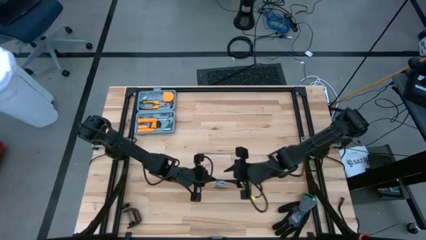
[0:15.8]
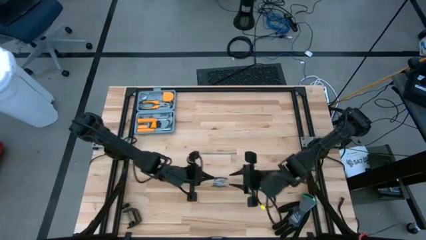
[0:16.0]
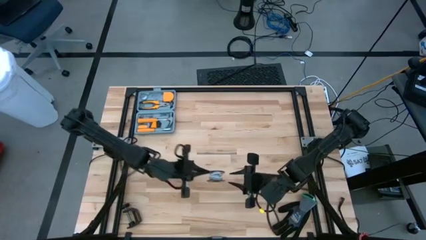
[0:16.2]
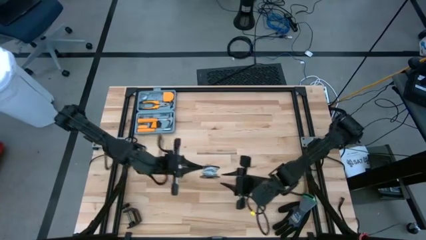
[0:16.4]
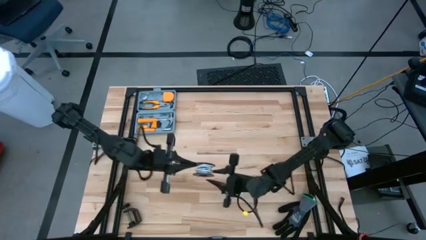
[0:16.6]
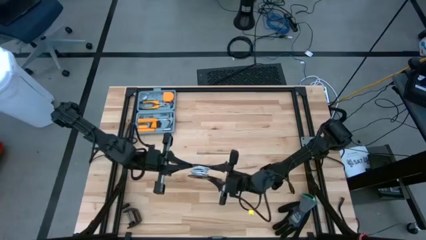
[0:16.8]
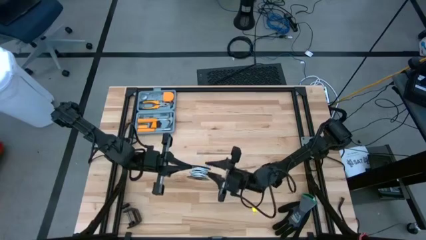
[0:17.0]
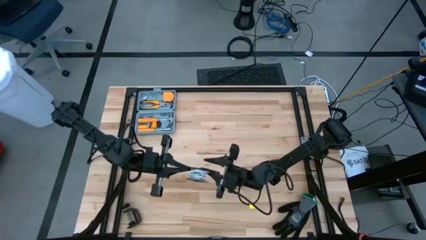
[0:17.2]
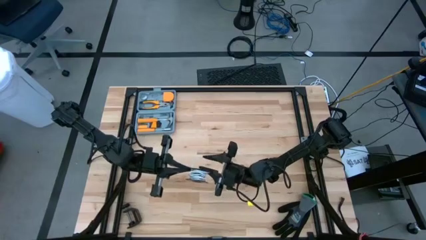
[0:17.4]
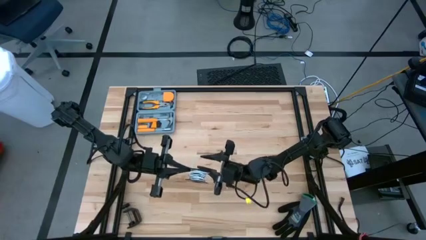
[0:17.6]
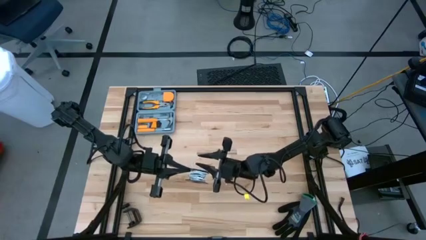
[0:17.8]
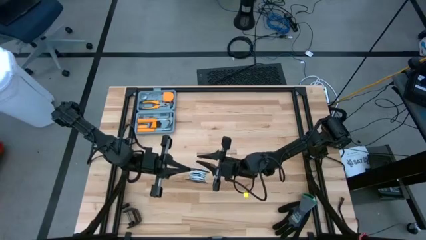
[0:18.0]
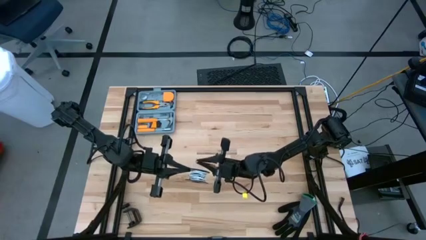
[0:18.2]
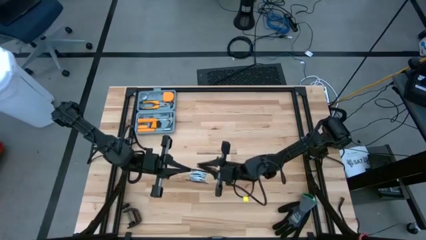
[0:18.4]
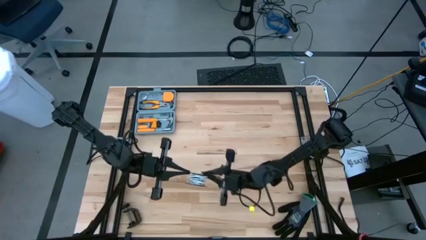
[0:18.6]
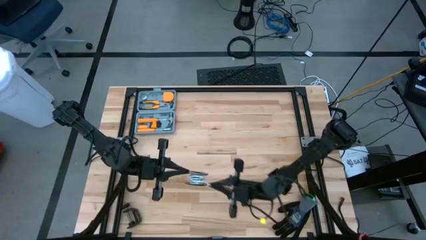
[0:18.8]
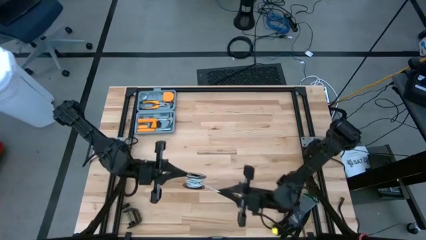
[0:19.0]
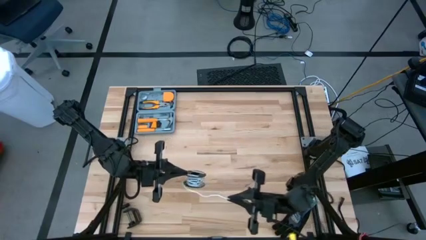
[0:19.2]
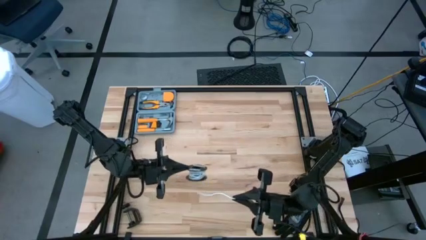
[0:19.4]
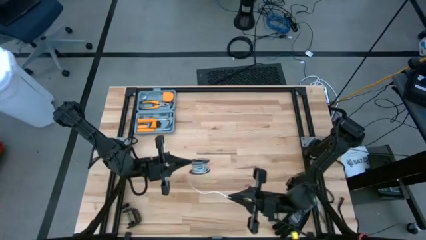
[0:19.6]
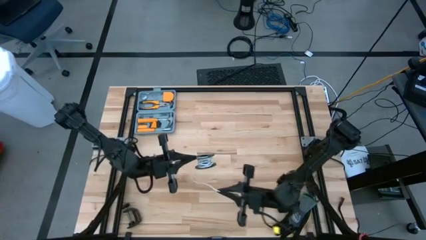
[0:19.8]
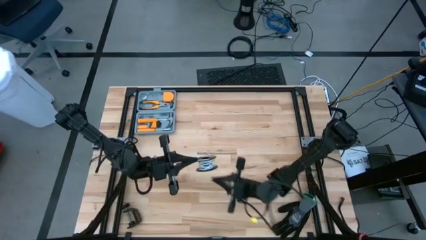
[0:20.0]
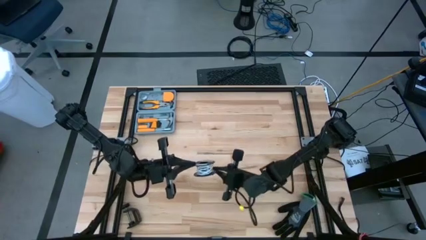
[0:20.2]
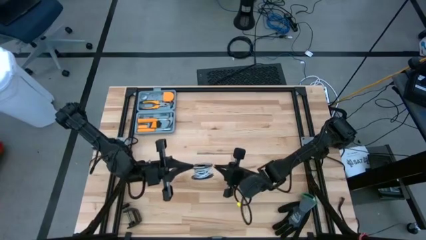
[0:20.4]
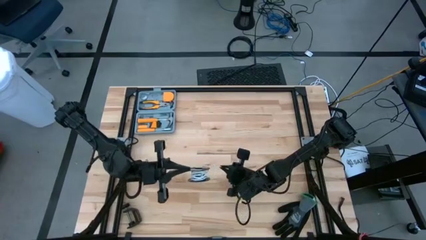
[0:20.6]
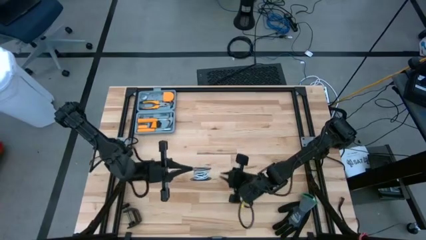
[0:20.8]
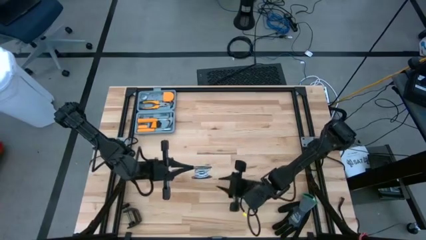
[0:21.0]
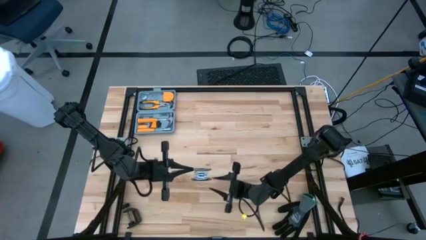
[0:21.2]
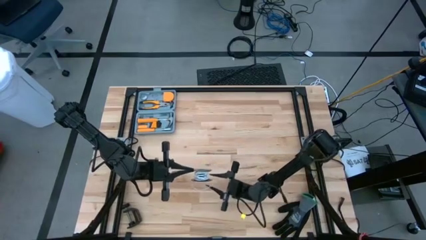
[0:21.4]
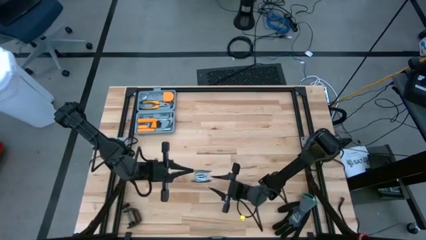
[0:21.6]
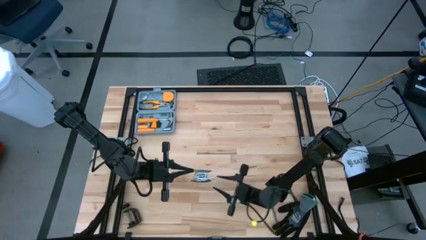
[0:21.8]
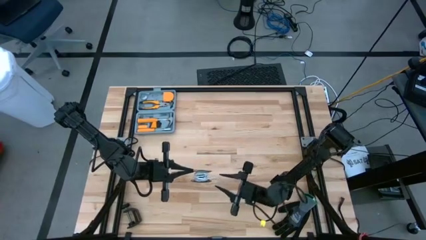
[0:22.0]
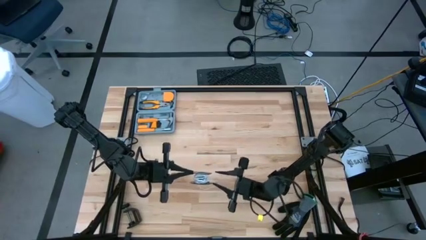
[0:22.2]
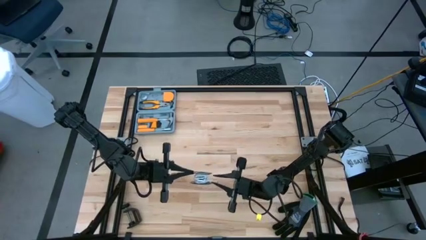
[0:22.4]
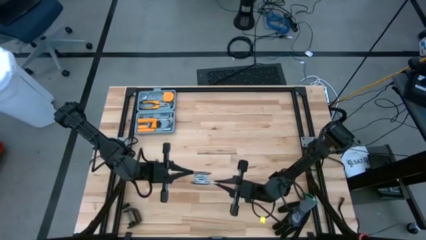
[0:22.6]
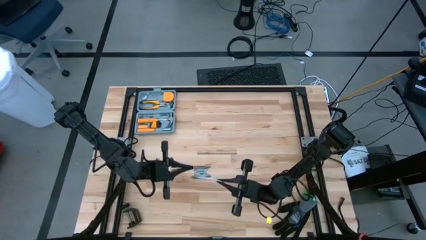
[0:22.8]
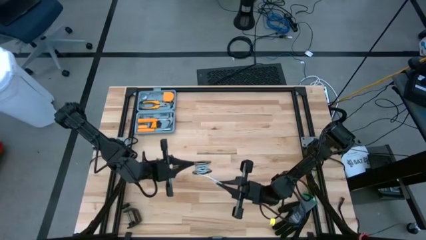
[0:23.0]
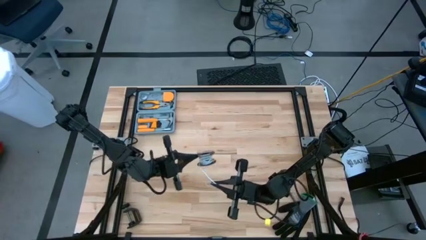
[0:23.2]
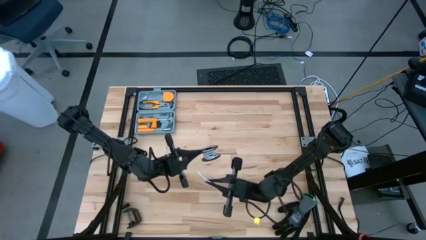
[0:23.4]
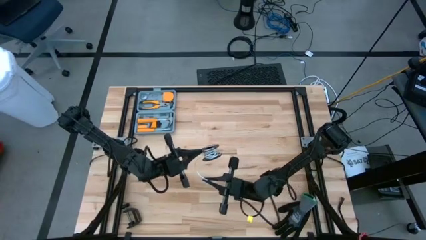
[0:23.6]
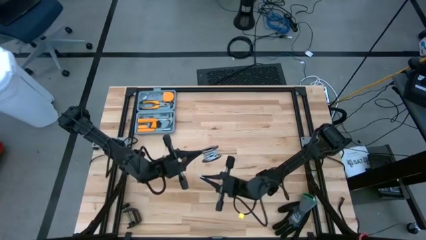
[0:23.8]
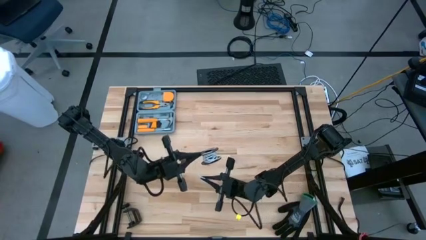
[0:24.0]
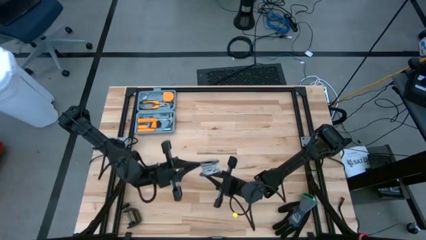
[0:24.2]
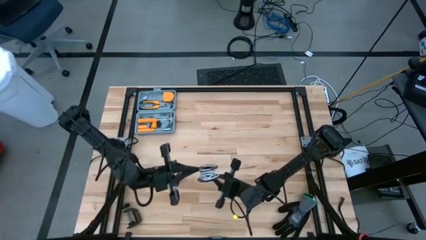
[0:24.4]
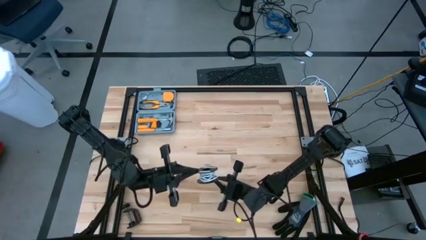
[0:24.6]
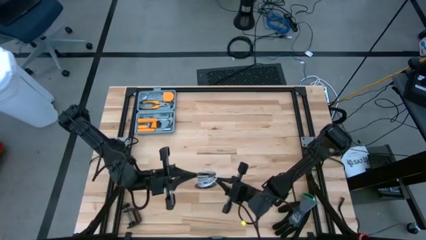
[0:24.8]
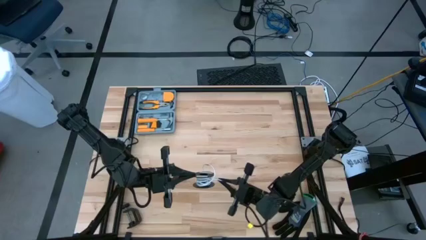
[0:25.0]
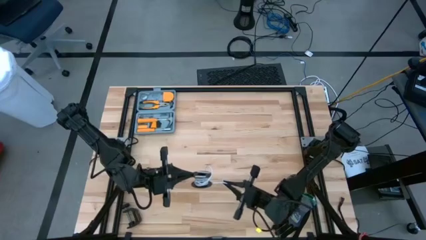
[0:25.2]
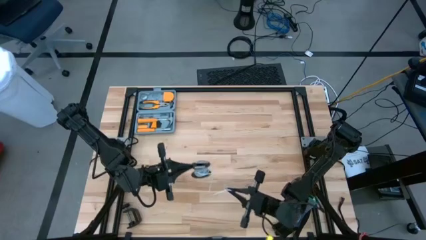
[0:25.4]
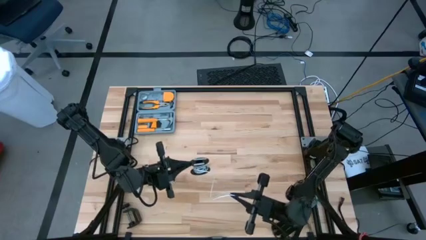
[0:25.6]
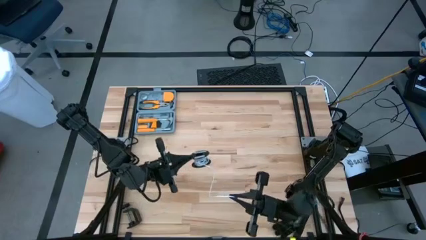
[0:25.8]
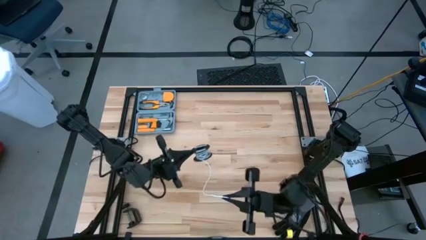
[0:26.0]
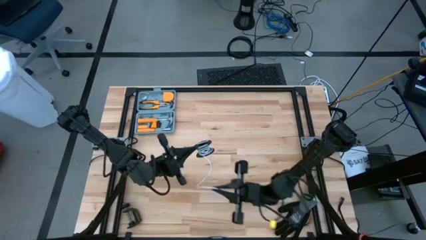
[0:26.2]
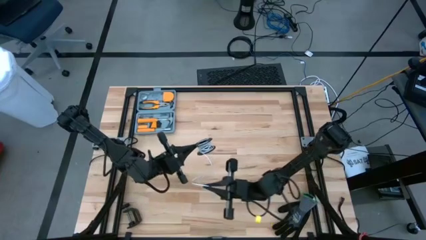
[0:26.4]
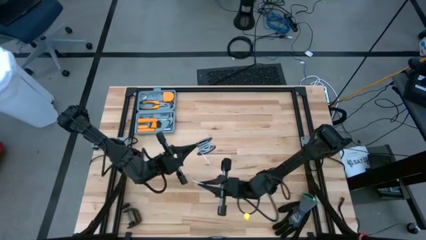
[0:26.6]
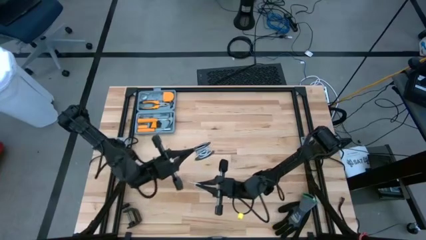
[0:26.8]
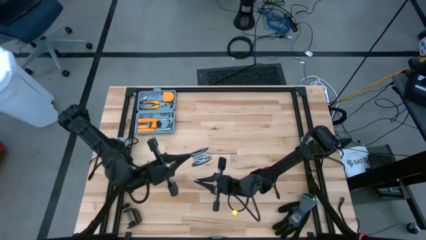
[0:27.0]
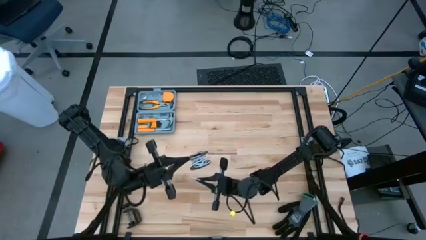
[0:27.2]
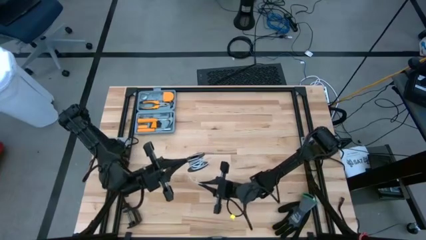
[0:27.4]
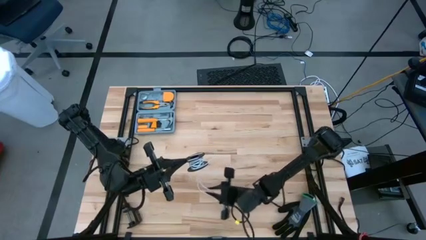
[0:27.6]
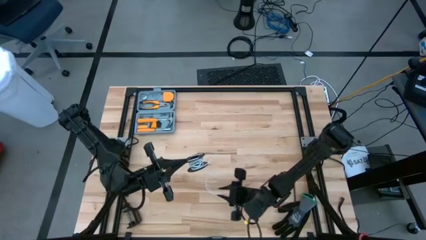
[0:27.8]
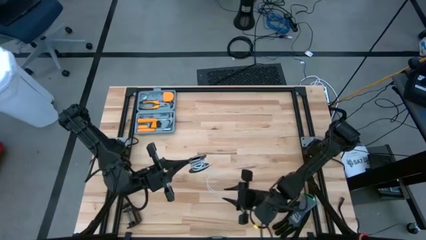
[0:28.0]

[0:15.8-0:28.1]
Task: Coil cords
Uncoil the white wire from the spool

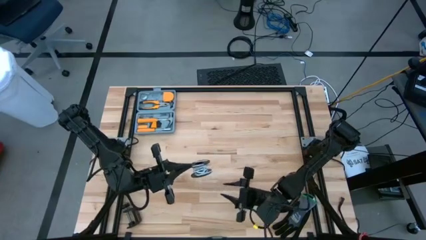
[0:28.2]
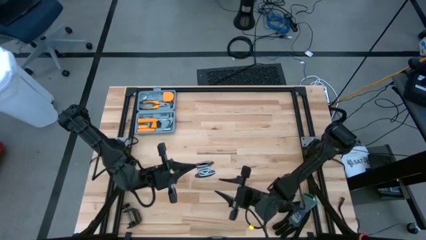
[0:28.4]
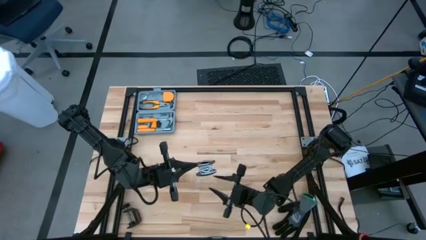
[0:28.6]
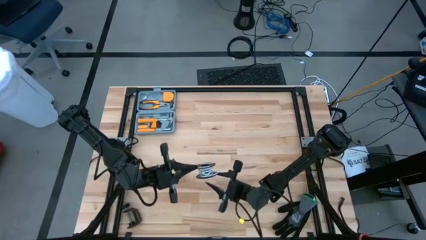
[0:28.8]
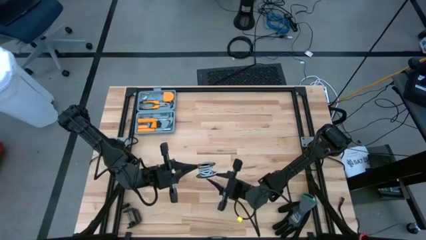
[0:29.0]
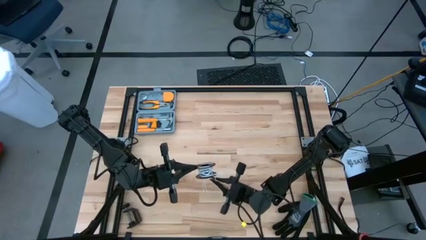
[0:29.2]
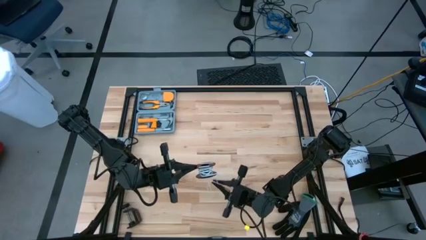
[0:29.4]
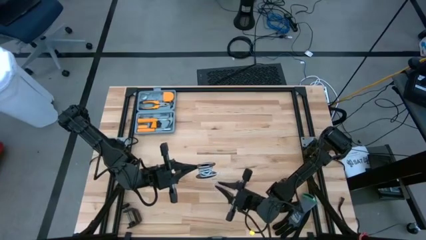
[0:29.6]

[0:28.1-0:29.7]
Uncoil the white wire from the spool

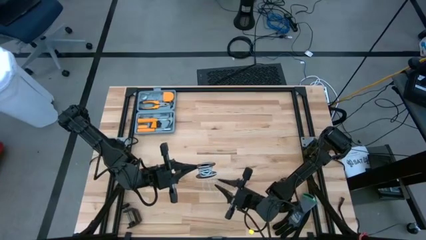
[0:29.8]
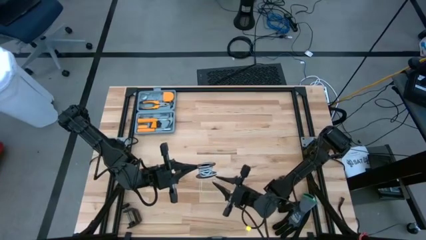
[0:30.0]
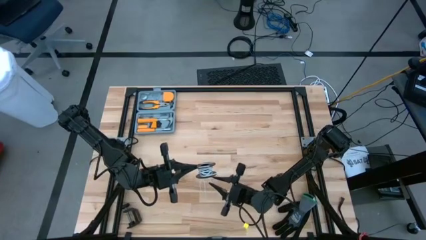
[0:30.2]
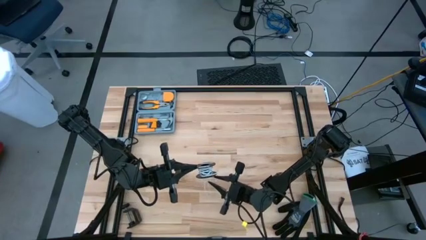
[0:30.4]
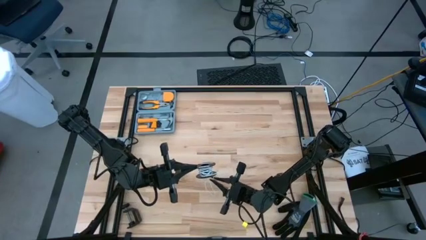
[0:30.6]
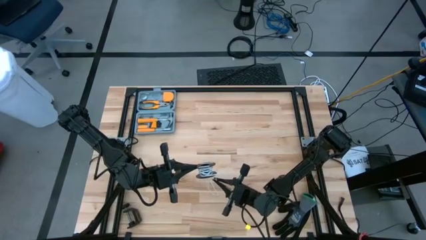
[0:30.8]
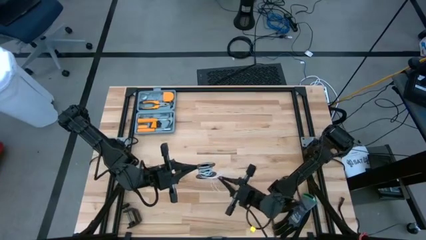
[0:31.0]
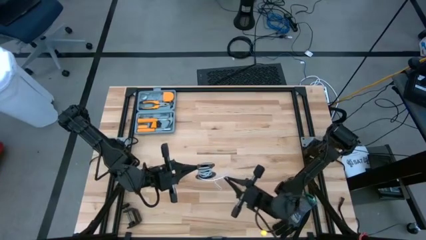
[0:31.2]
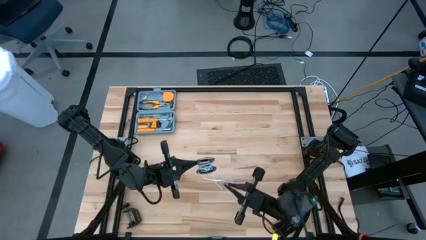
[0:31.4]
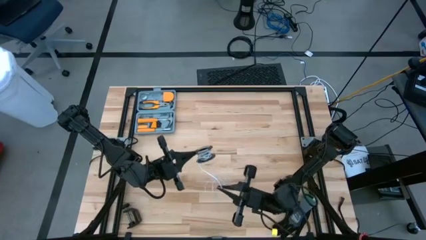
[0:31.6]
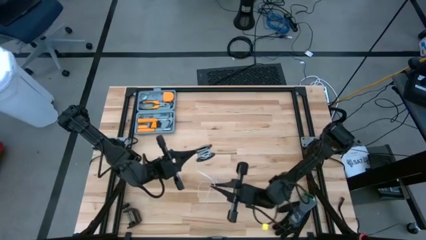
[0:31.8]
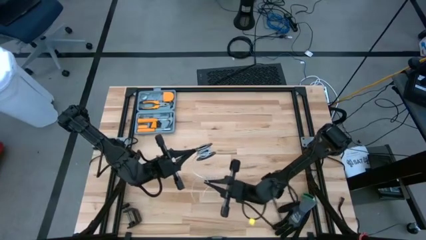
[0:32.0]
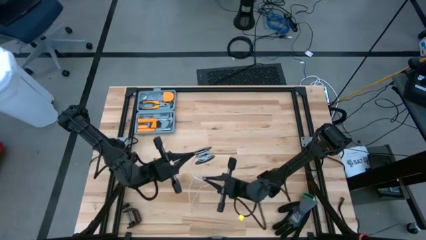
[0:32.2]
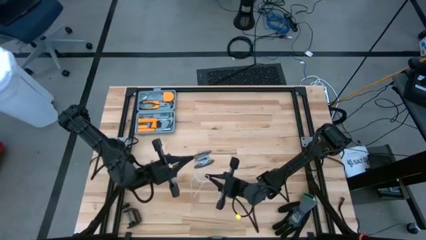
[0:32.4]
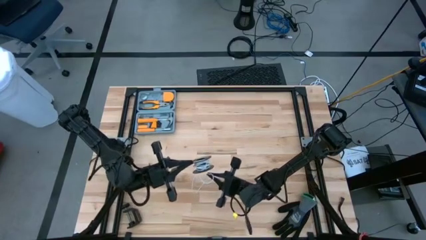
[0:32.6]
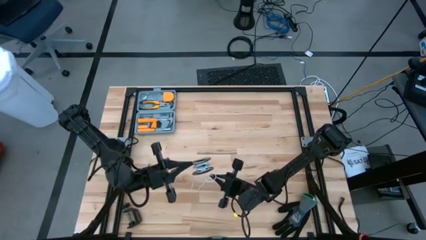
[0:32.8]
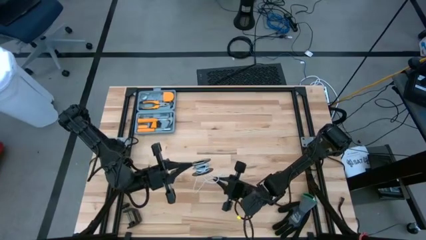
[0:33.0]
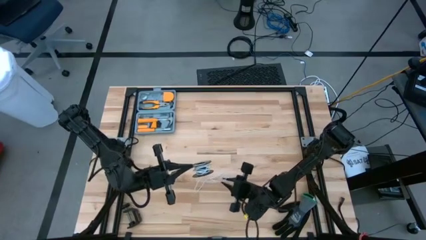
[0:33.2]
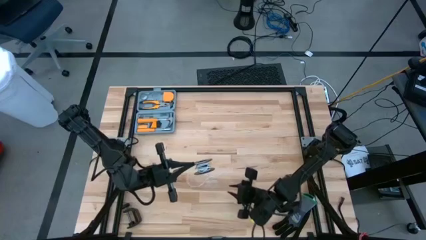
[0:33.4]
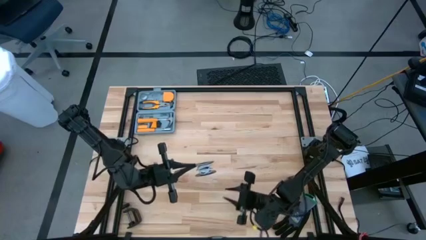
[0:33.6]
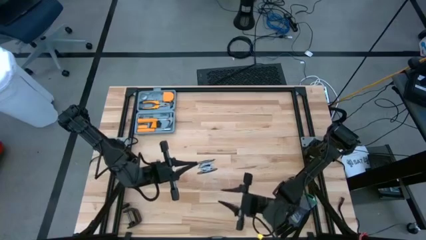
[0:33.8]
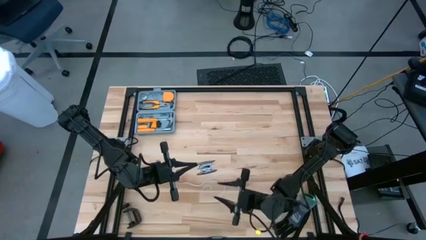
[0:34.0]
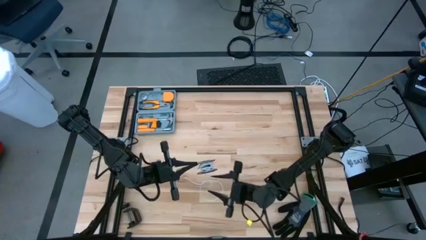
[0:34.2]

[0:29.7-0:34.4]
Uncoil the white wire from the spool
